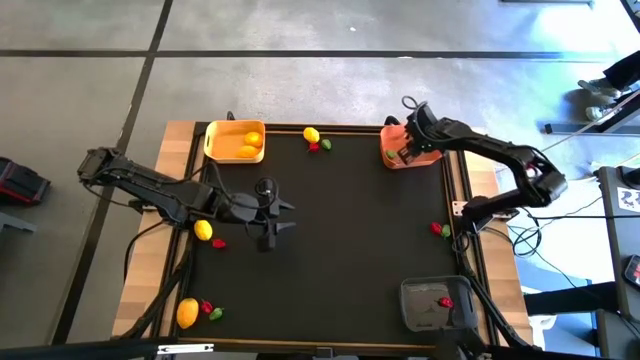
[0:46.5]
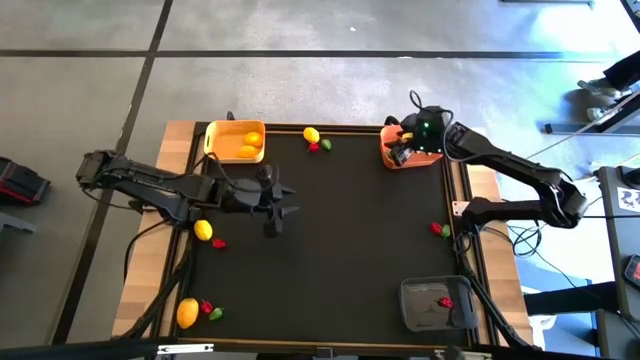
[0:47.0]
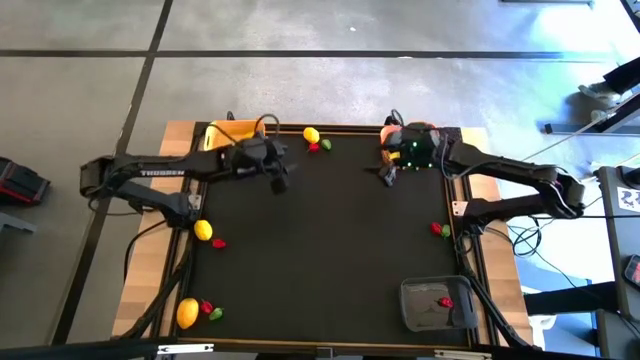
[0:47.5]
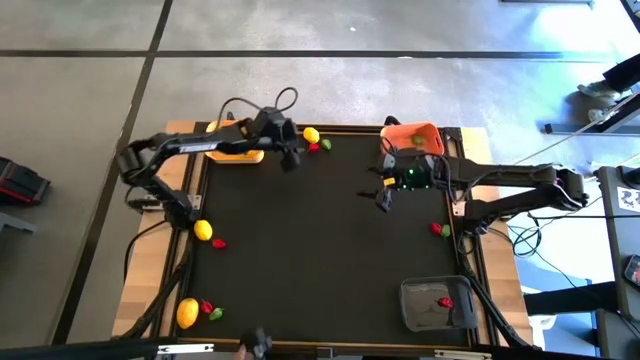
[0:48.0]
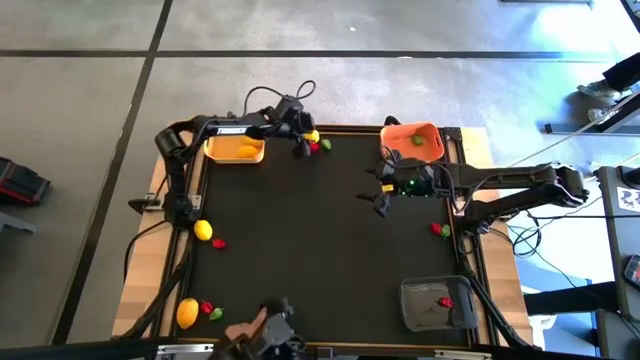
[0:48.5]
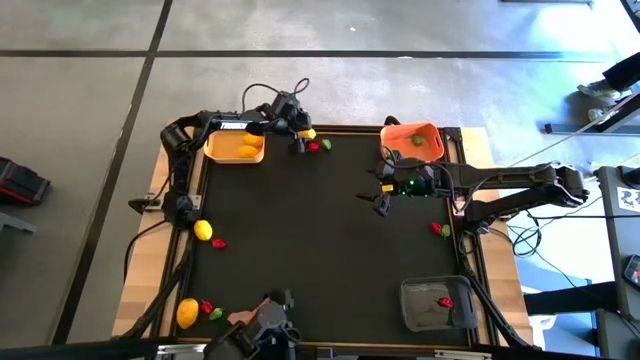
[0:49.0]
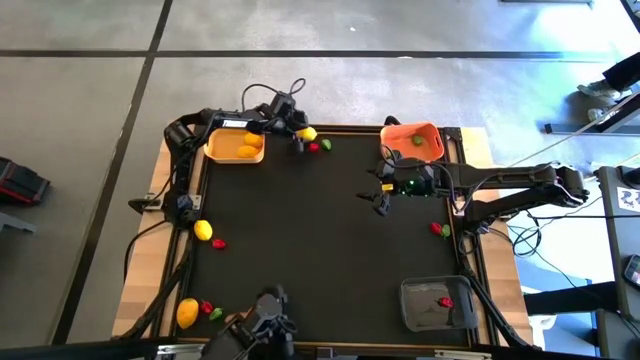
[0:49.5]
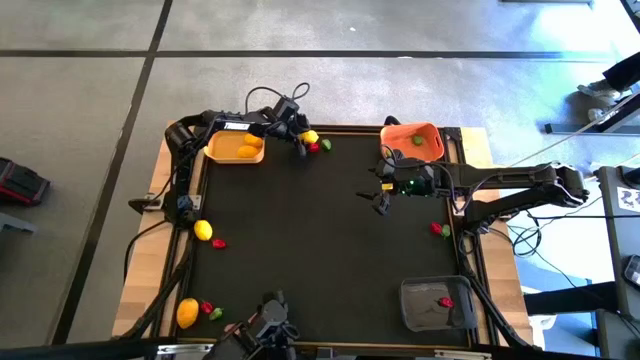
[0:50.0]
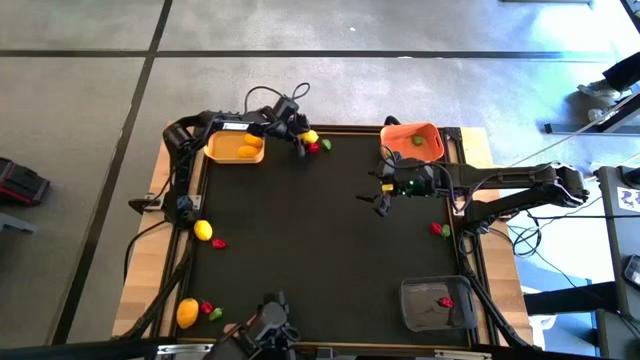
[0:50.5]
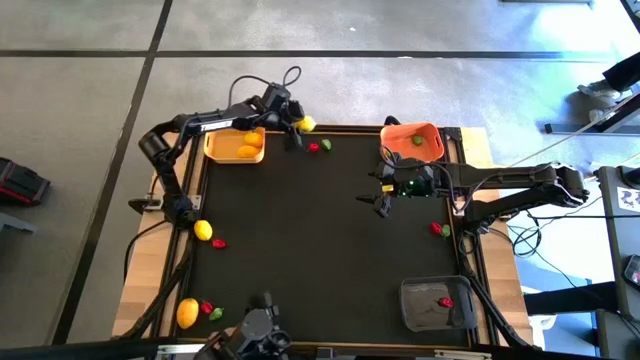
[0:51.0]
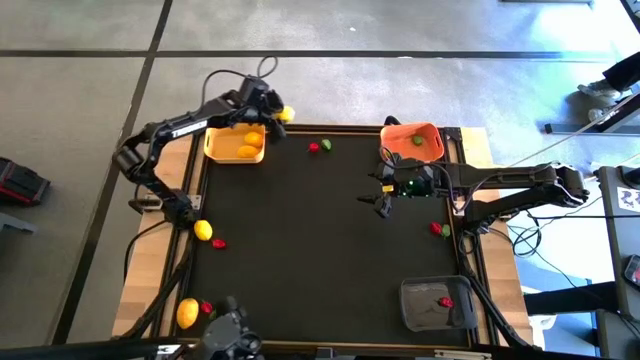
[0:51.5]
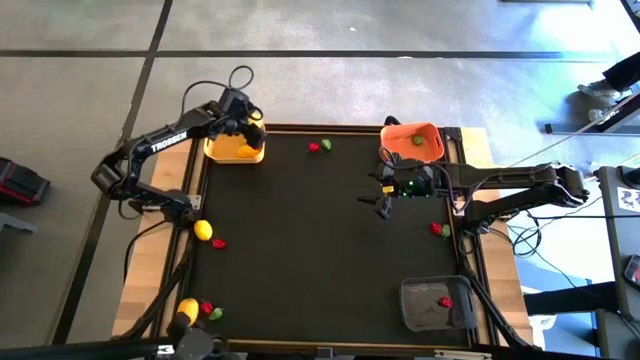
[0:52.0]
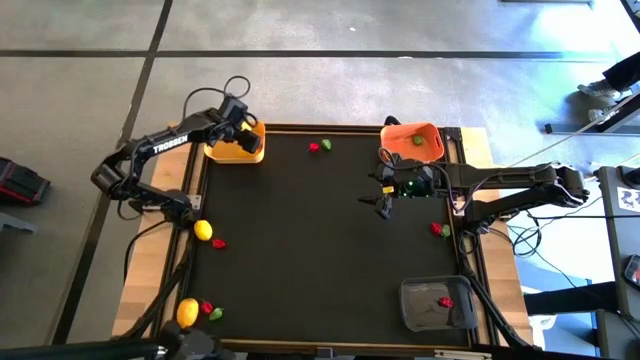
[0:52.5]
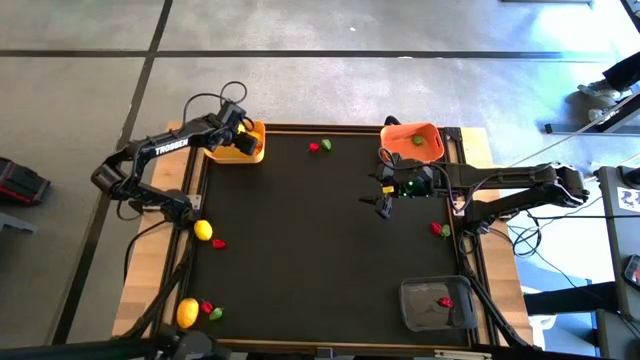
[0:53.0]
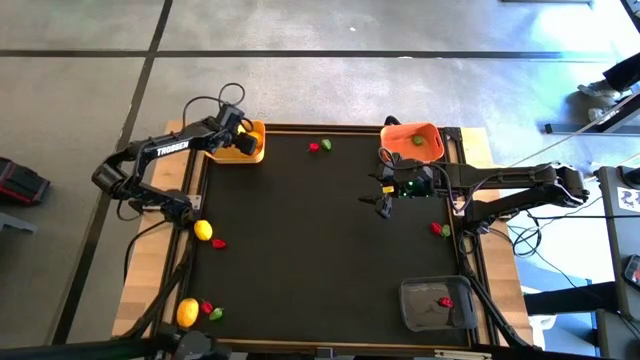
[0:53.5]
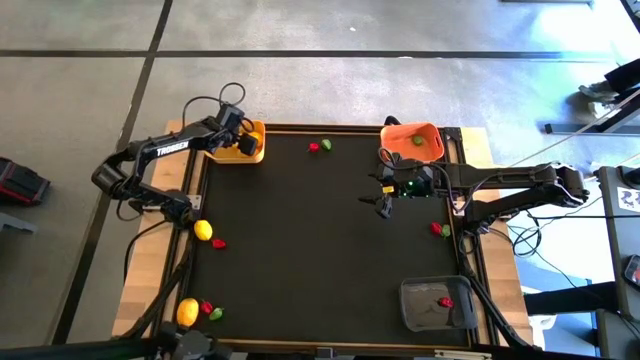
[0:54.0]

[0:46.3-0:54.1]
Task: Sort produce into baskets
Put the lemon into the yellow bin

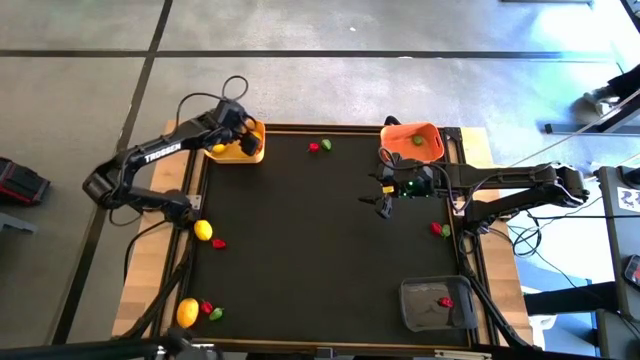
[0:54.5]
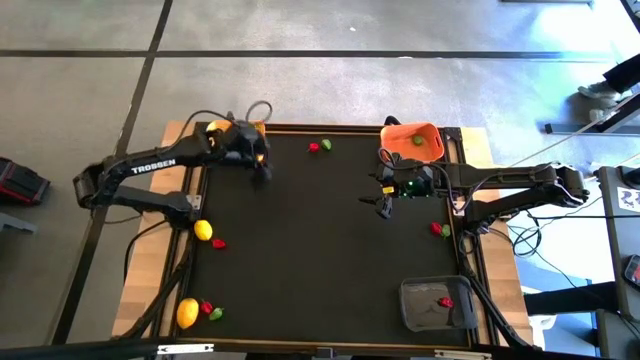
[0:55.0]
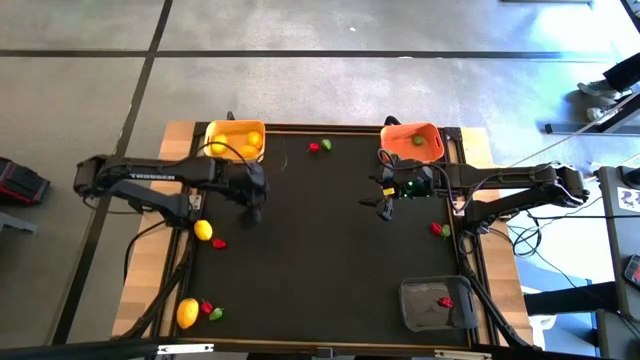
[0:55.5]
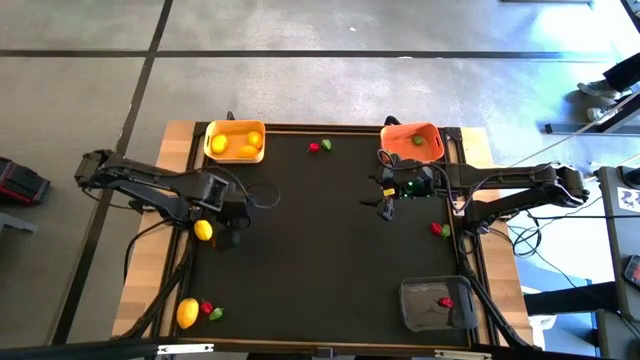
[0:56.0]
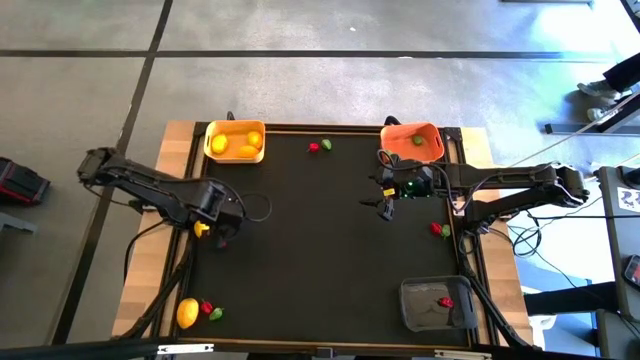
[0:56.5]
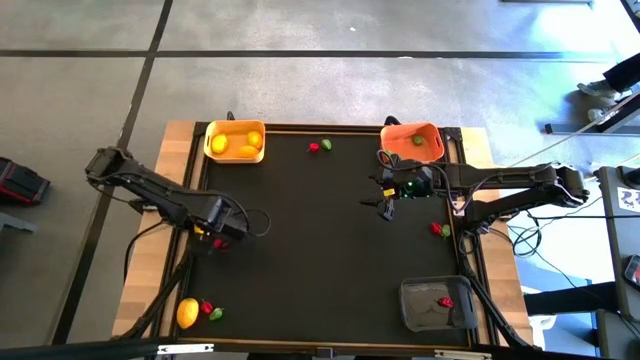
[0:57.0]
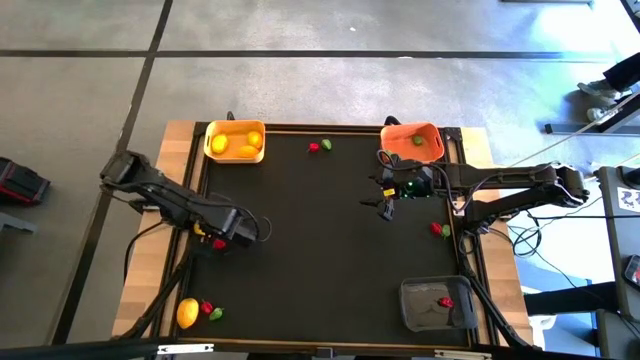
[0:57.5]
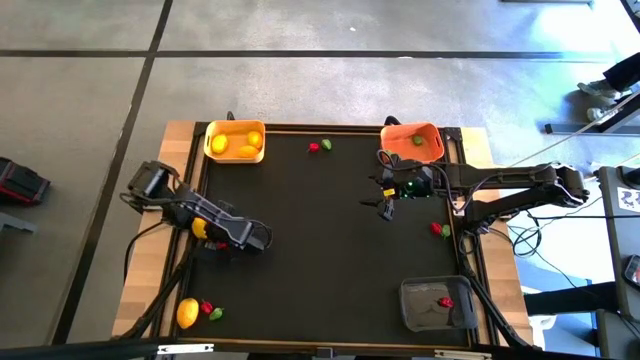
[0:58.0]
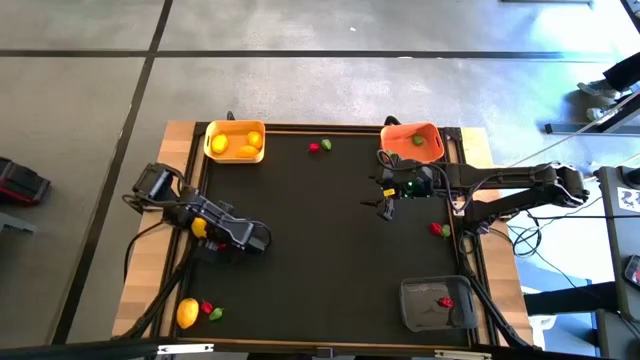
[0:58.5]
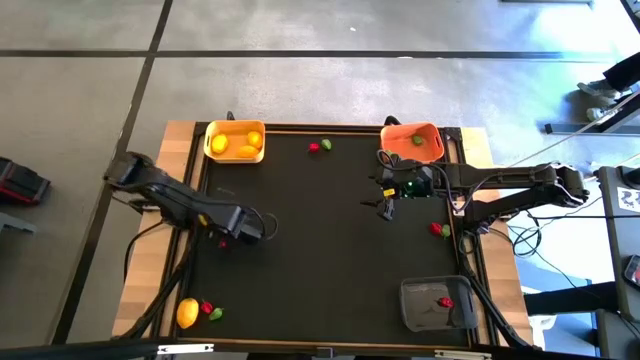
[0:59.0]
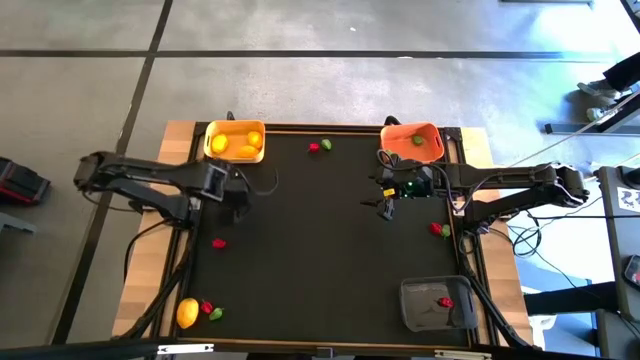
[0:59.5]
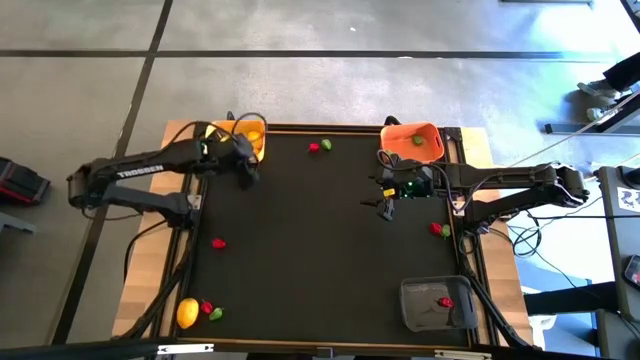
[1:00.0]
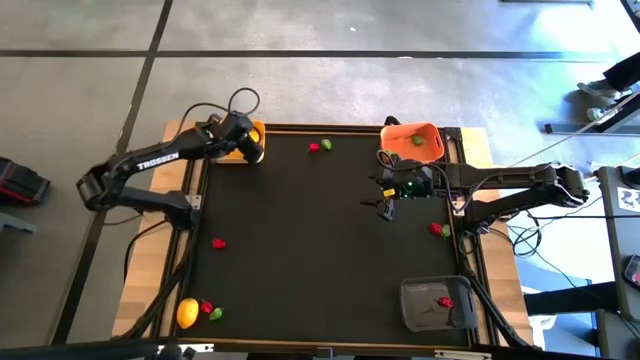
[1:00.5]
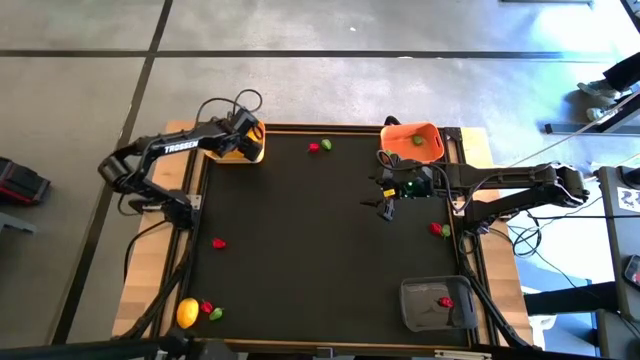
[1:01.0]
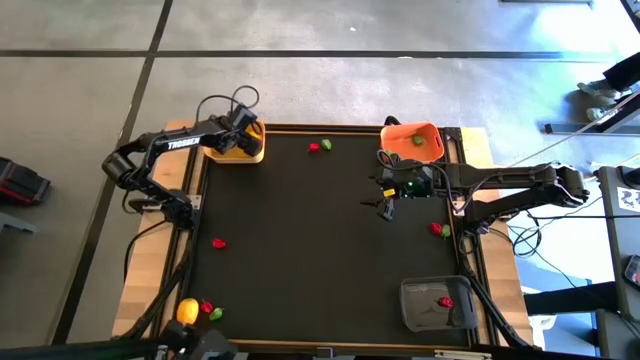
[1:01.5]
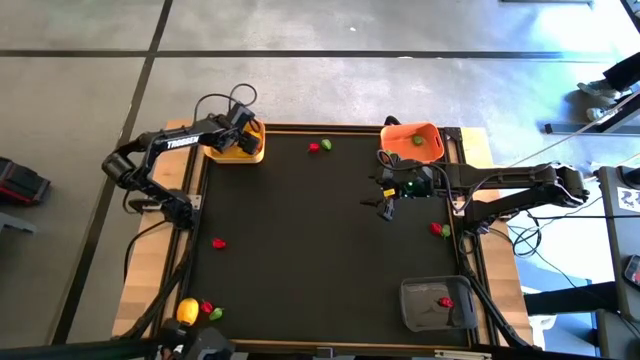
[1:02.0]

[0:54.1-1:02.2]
Put the lemon into the yellow bin

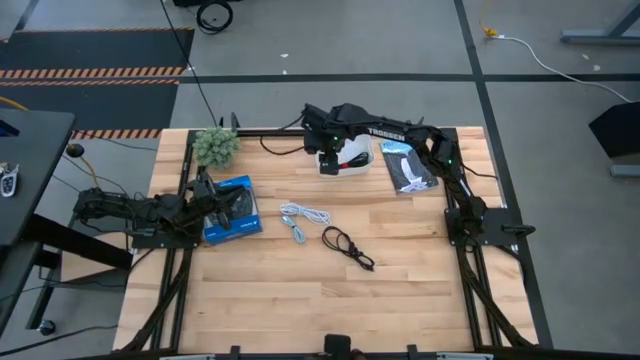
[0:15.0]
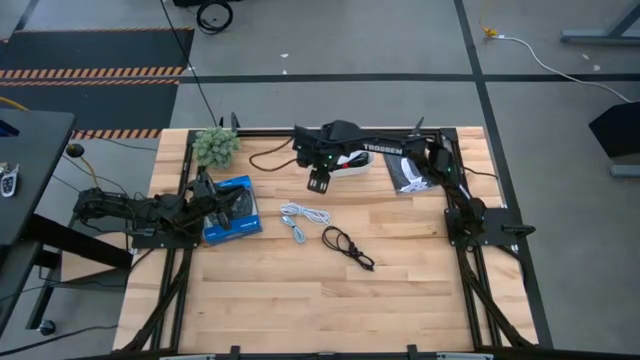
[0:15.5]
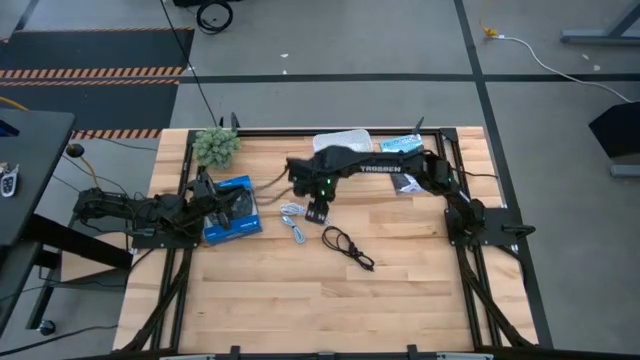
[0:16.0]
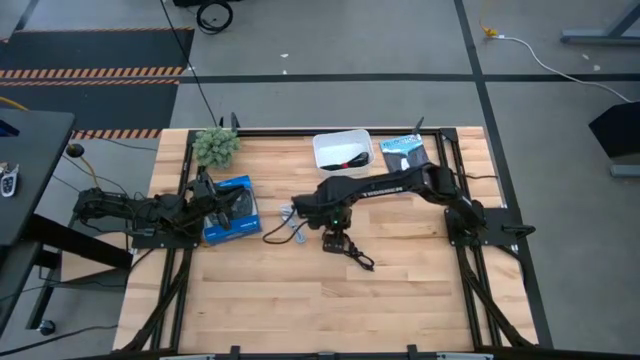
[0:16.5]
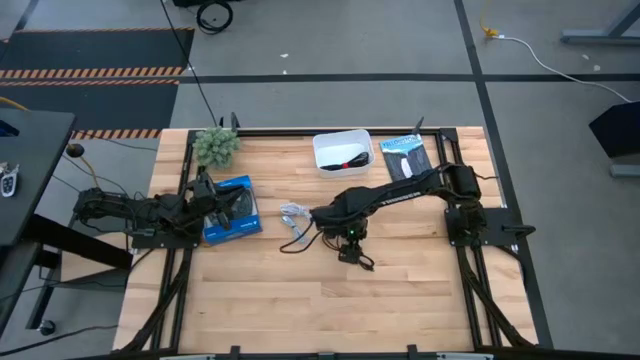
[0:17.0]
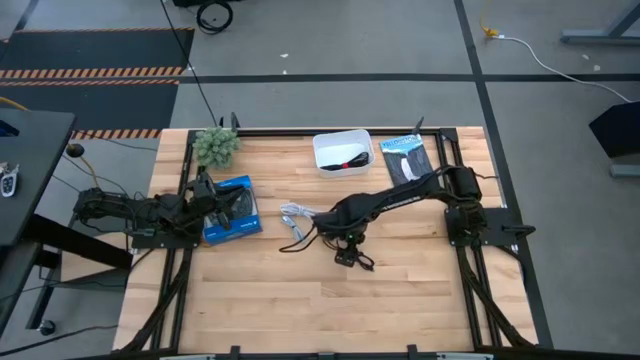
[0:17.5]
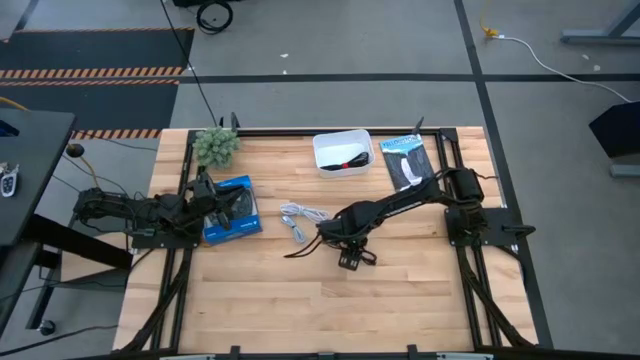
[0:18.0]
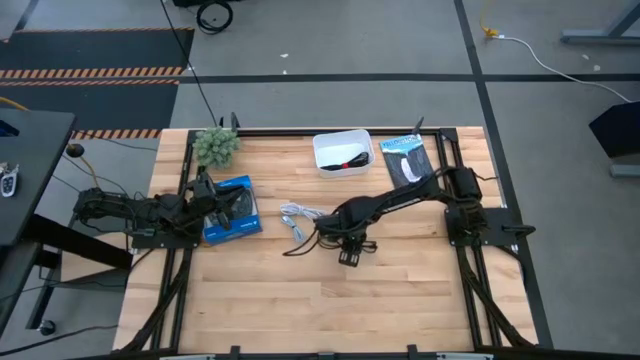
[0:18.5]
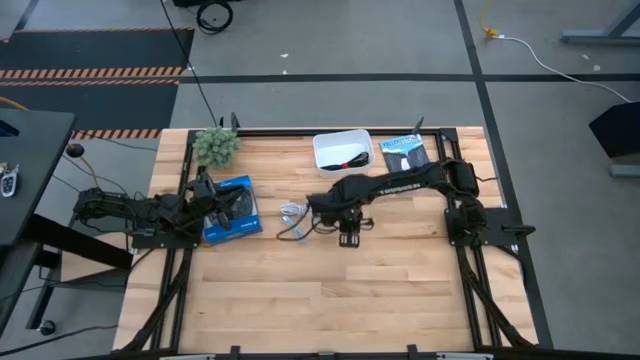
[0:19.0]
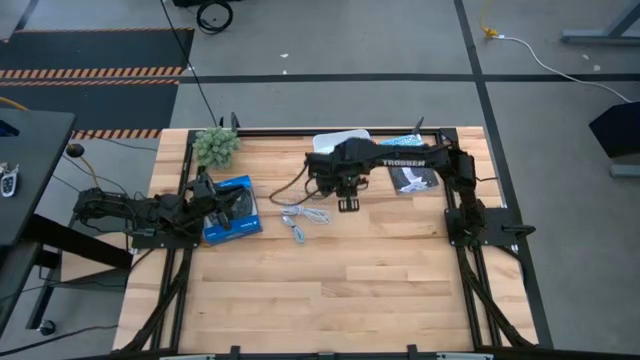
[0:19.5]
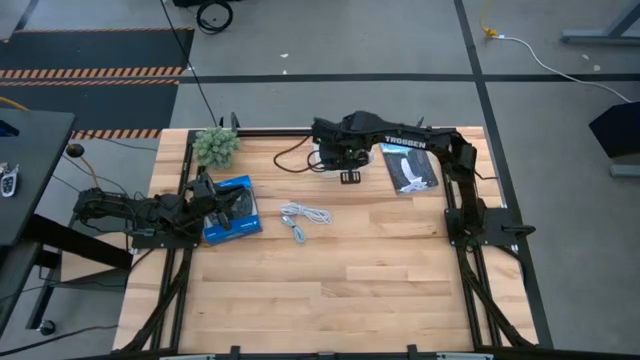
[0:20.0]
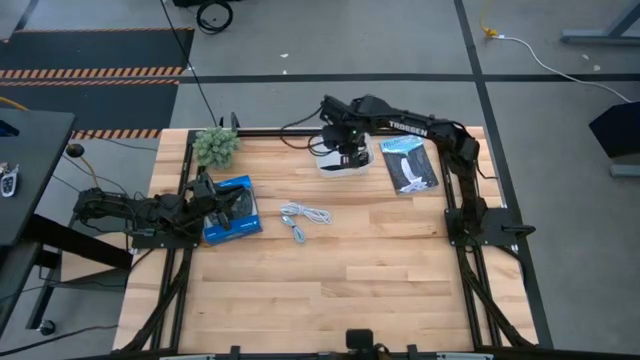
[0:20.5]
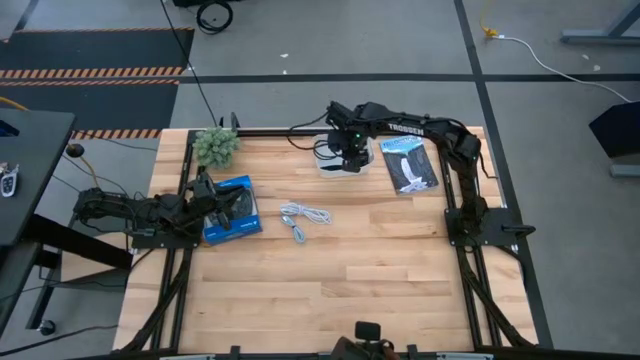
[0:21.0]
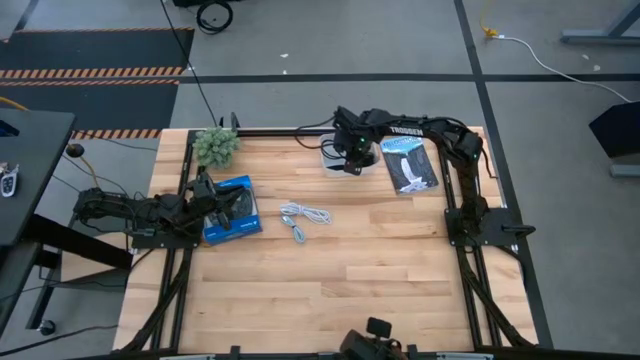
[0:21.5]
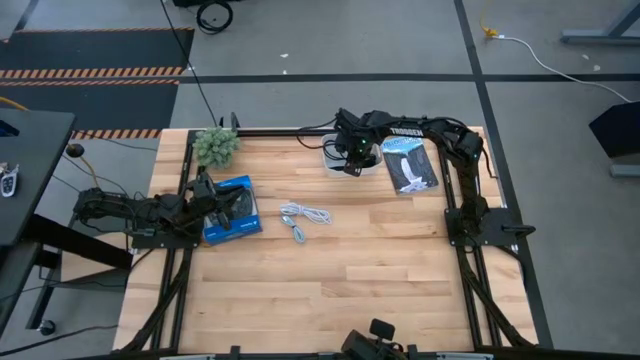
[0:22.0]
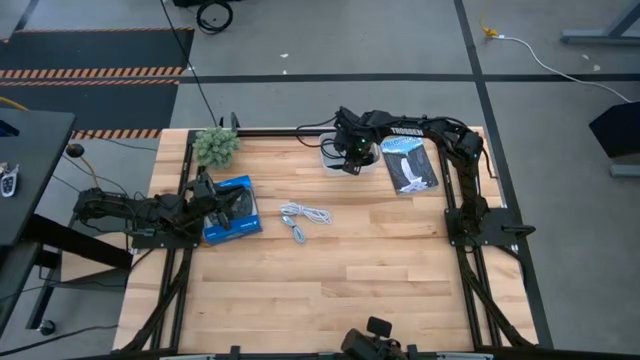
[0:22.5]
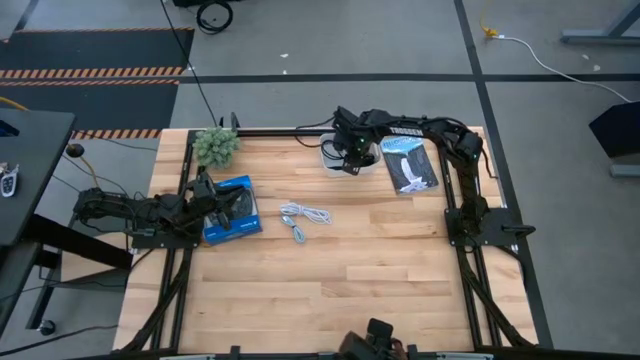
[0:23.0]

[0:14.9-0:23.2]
Task: Pick and place USB-C Cables
Put the black USB cable into the white bin
